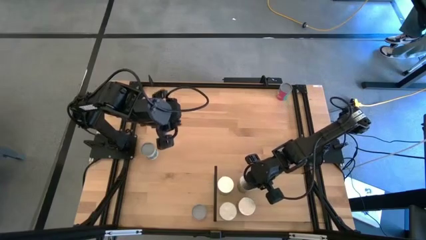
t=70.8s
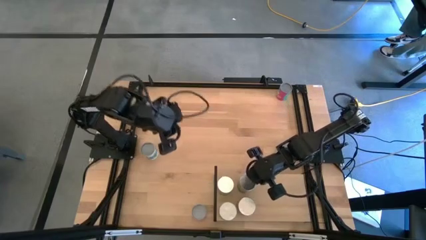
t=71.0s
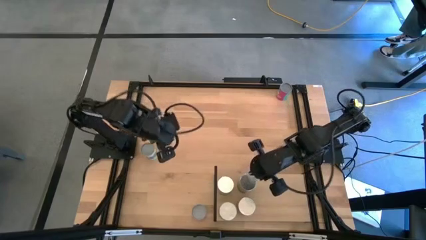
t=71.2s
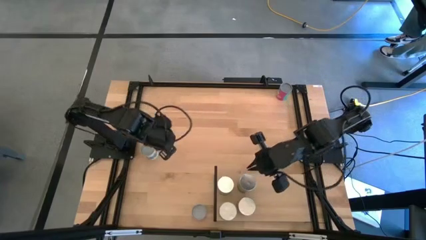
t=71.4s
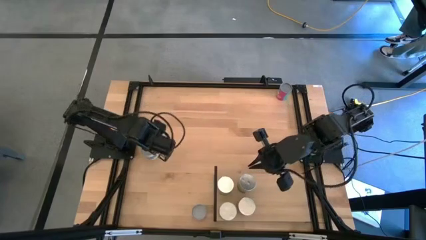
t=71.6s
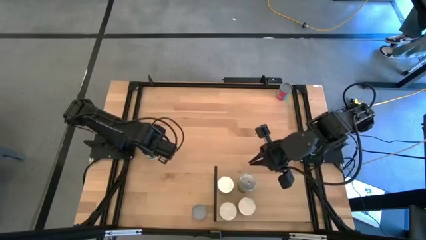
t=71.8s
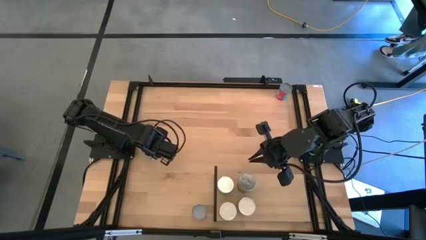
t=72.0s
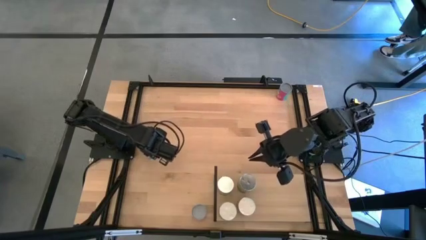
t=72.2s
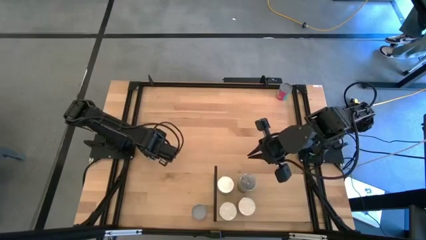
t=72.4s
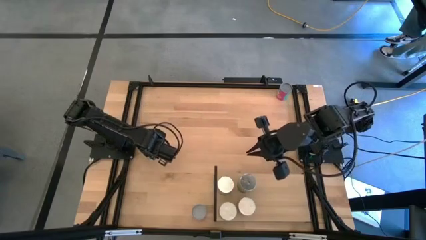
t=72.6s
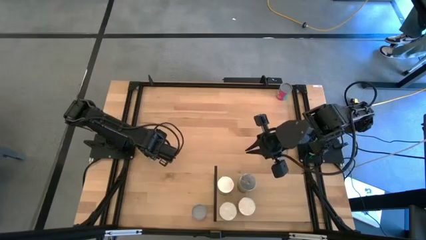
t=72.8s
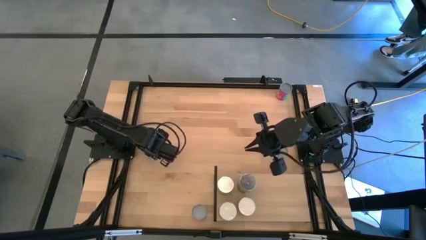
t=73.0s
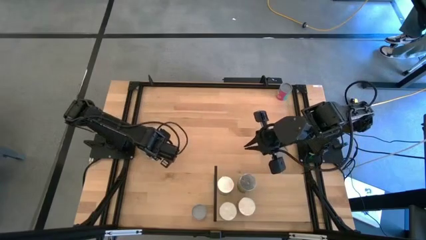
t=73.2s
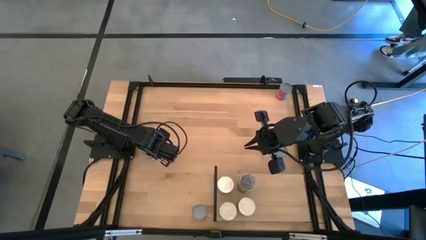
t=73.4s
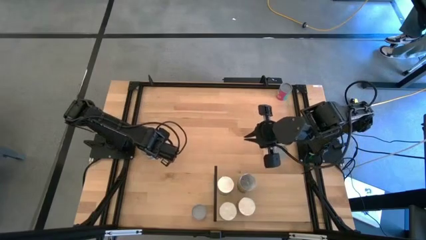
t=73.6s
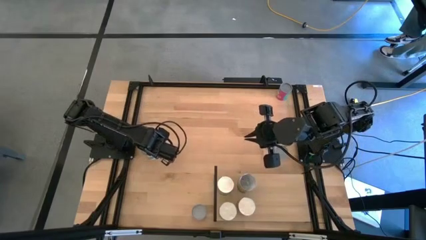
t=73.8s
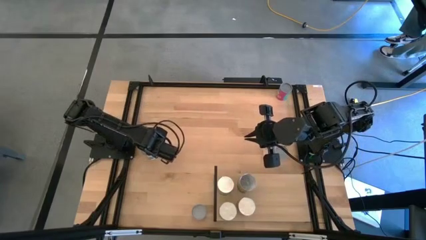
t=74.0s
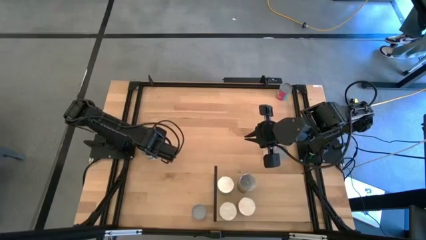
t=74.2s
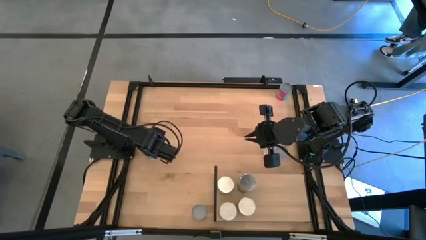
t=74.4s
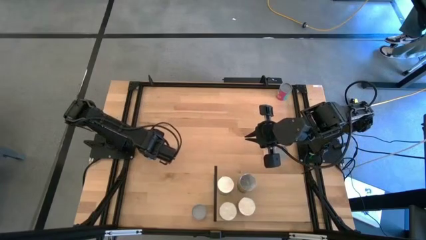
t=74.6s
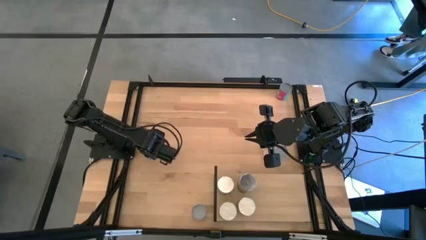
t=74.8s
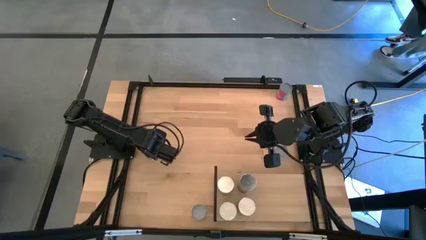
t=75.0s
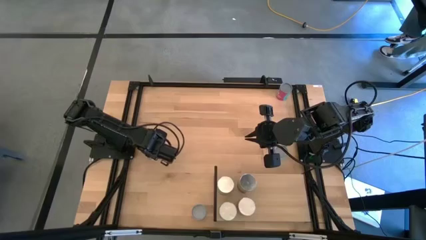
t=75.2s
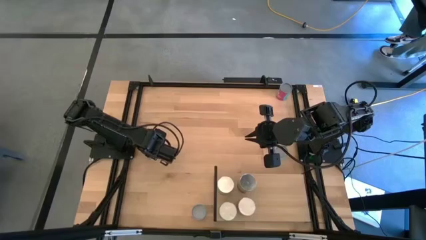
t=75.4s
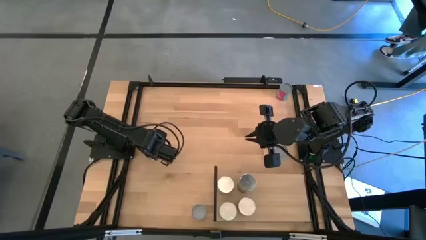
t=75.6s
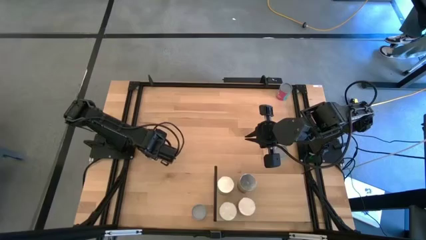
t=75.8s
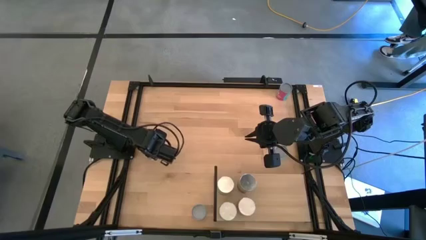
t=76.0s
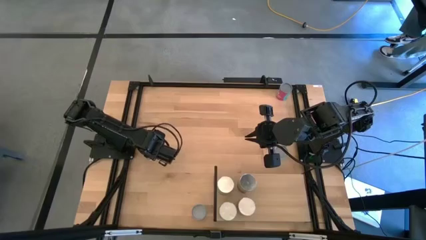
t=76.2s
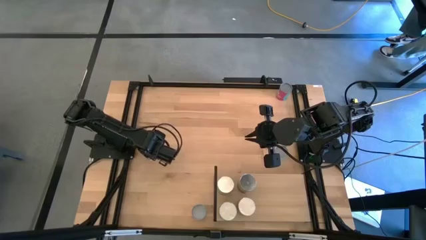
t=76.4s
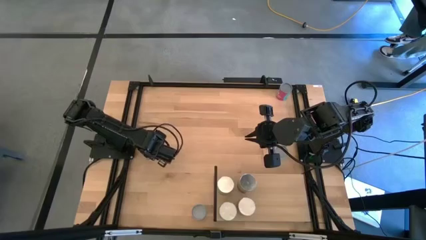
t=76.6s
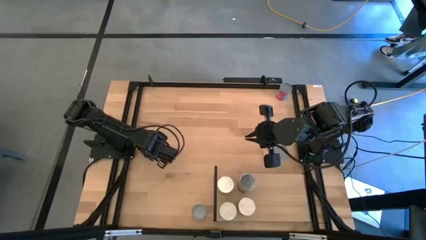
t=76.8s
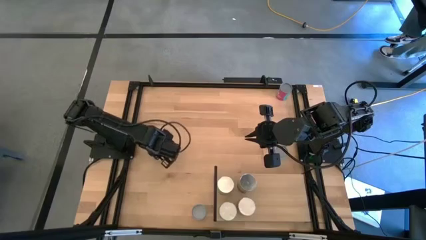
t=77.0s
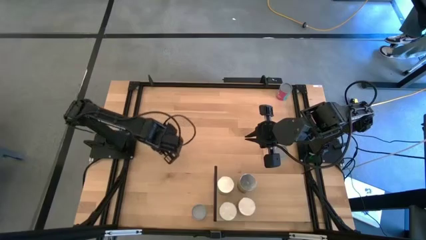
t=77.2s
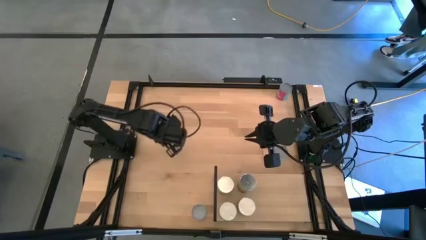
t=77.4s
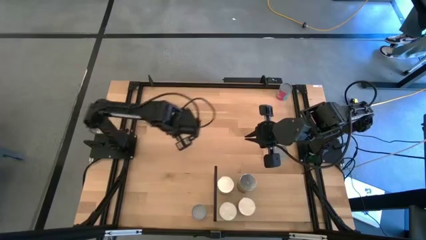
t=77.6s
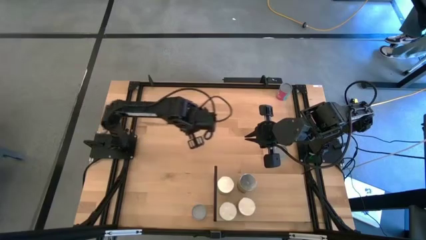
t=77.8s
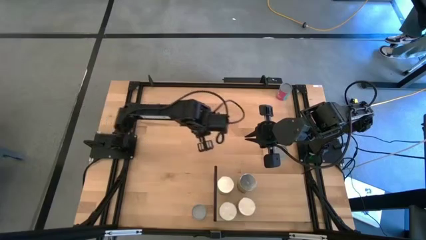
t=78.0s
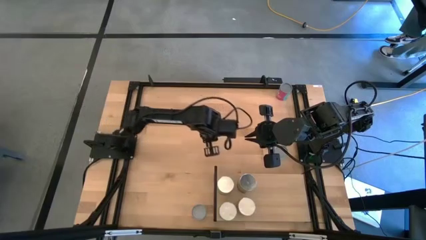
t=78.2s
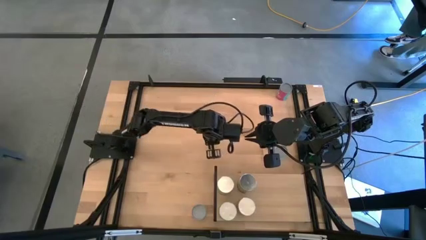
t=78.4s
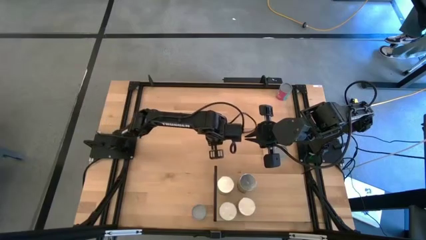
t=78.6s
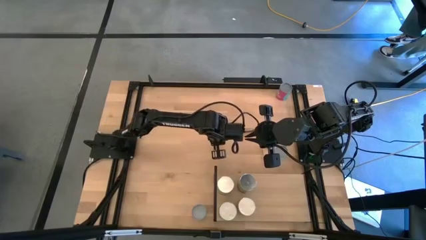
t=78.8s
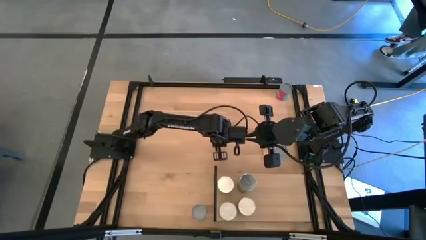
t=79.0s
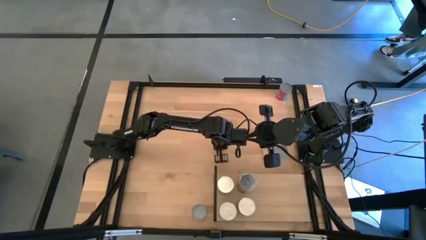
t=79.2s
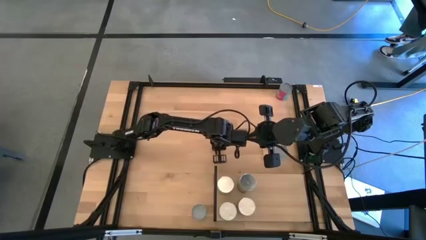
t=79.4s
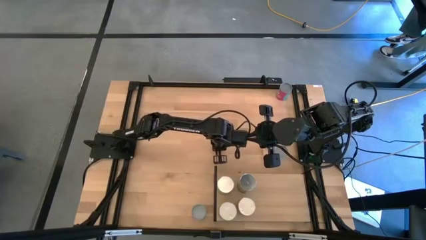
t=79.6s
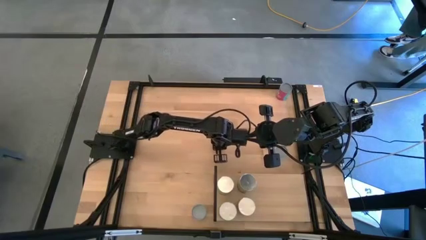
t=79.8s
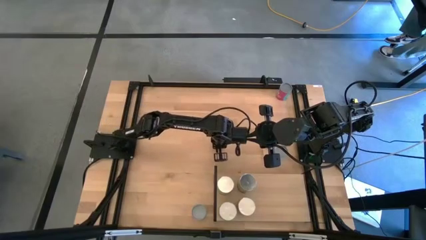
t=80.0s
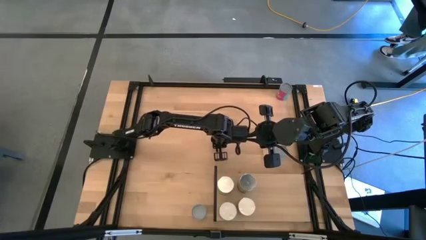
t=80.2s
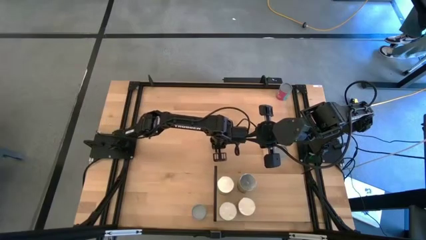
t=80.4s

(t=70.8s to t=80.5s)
Task: Pick and place cans onto a shelf
Put the canned vegetables on the shelf

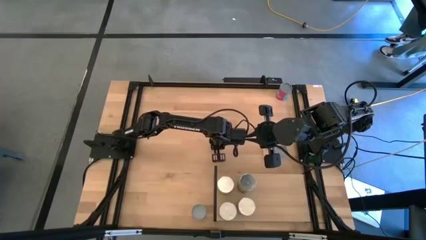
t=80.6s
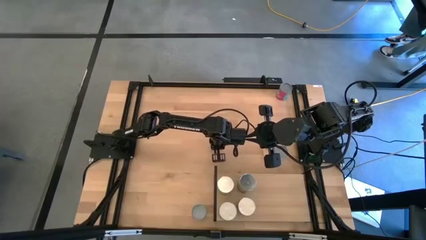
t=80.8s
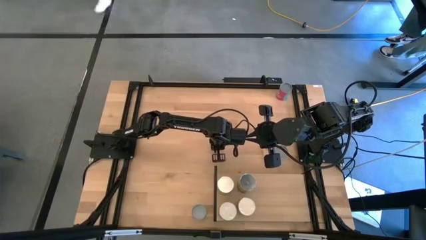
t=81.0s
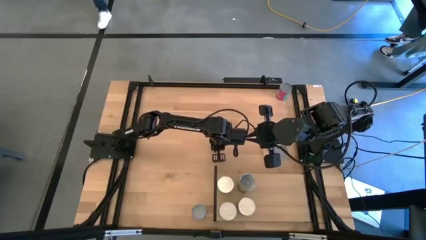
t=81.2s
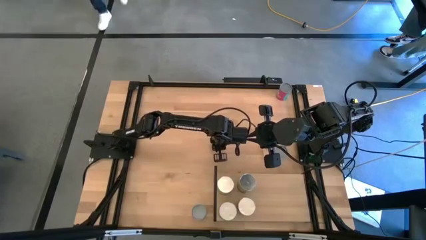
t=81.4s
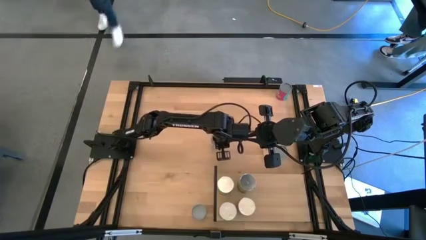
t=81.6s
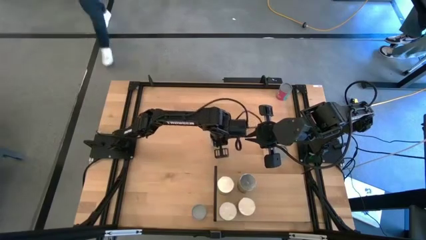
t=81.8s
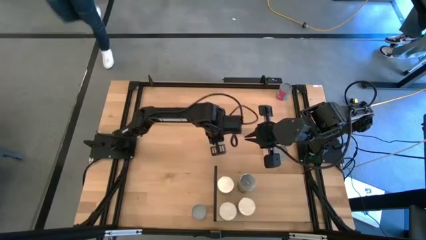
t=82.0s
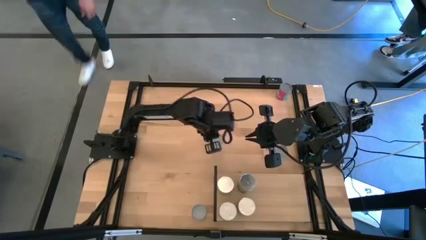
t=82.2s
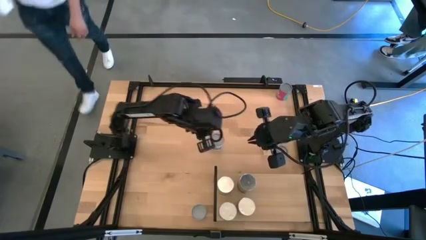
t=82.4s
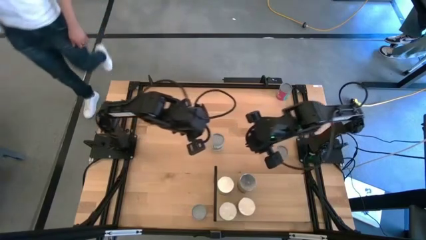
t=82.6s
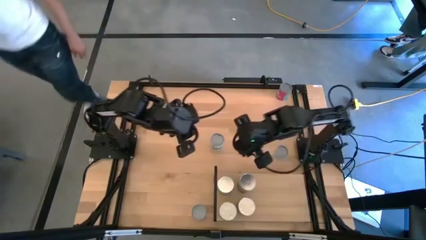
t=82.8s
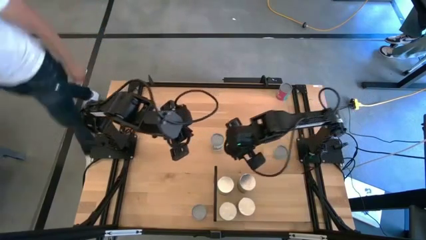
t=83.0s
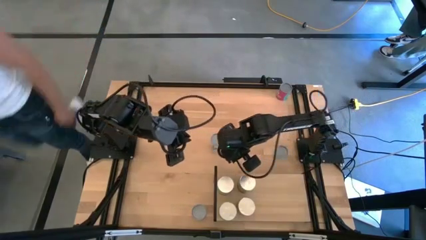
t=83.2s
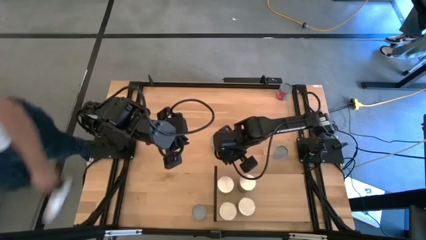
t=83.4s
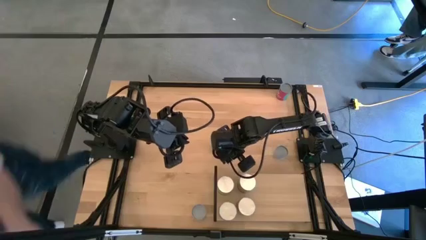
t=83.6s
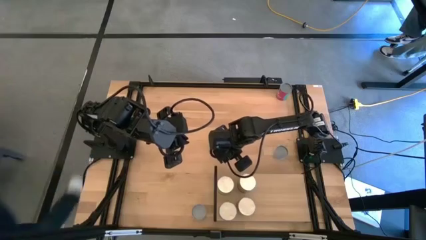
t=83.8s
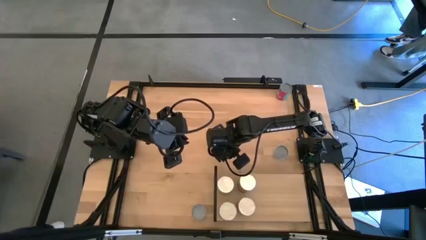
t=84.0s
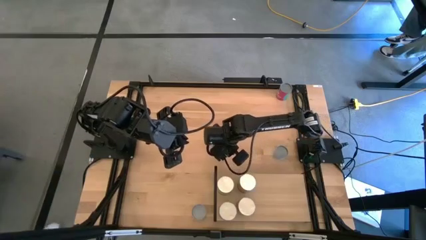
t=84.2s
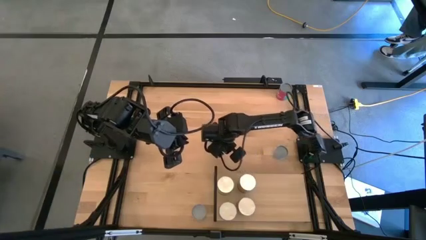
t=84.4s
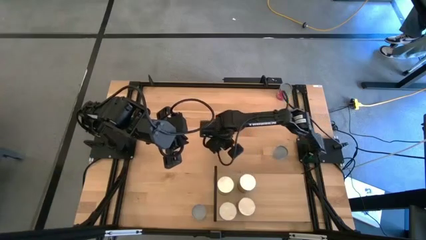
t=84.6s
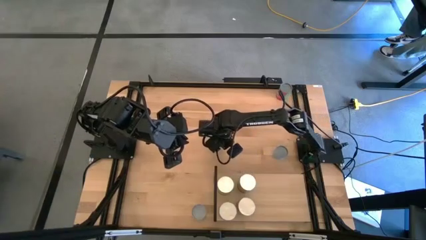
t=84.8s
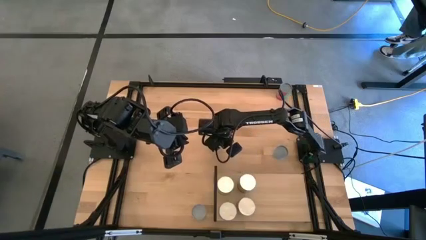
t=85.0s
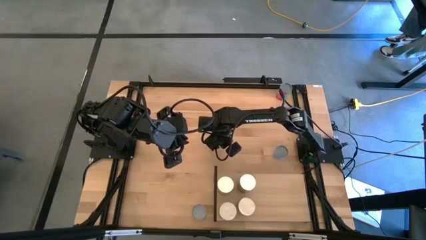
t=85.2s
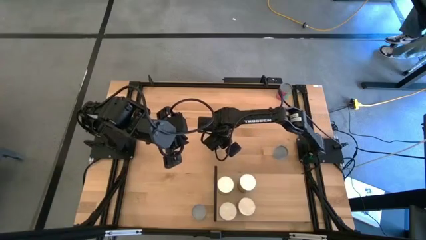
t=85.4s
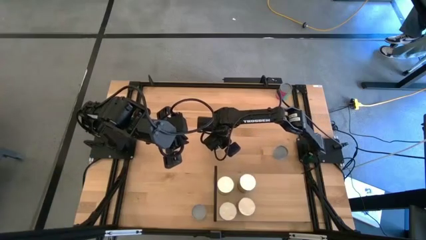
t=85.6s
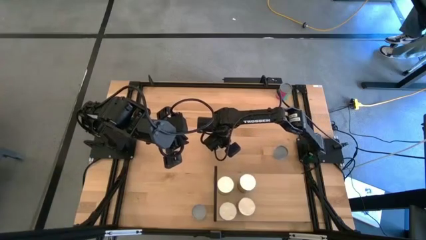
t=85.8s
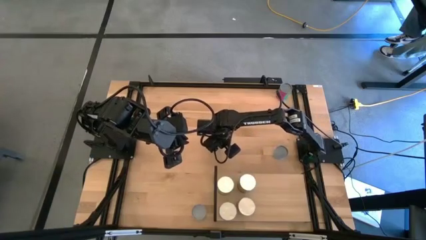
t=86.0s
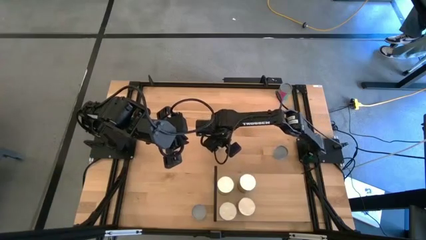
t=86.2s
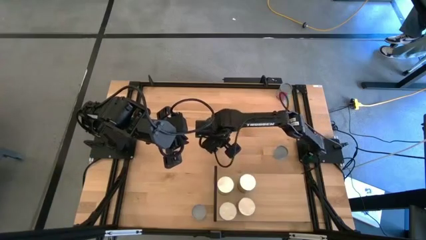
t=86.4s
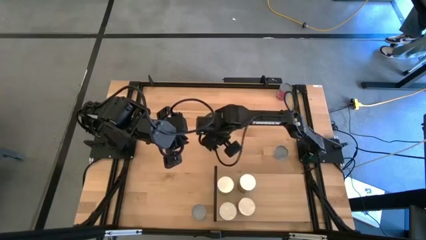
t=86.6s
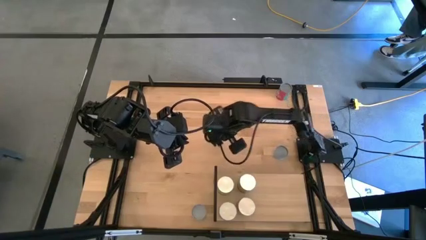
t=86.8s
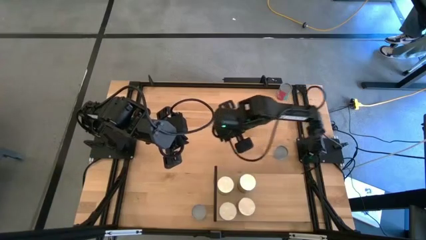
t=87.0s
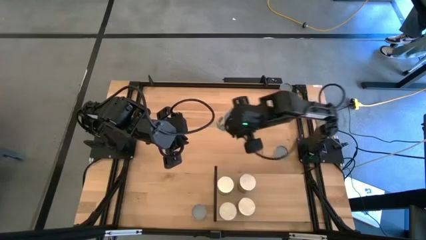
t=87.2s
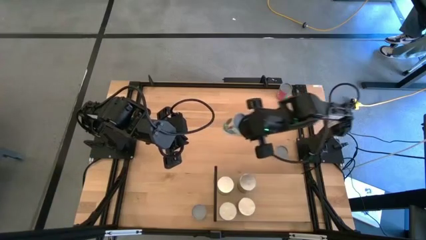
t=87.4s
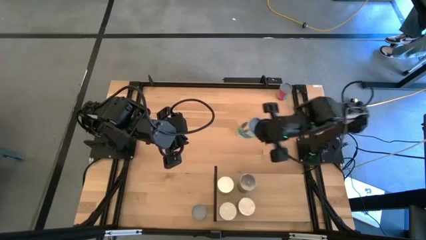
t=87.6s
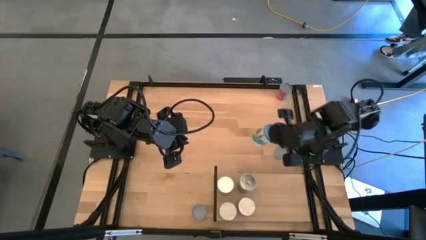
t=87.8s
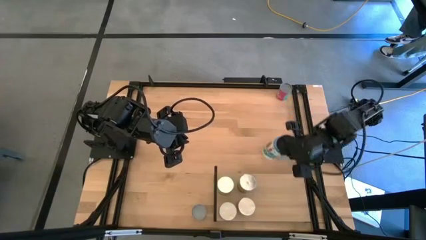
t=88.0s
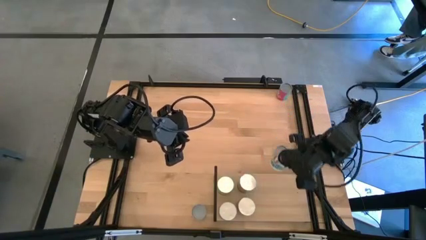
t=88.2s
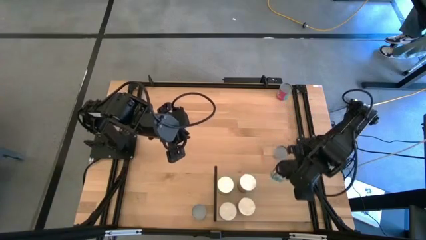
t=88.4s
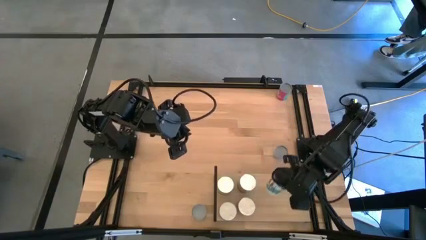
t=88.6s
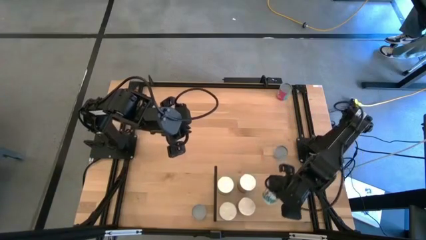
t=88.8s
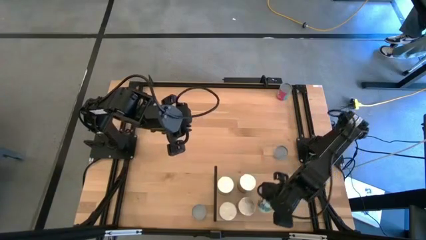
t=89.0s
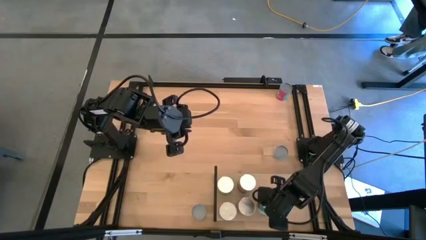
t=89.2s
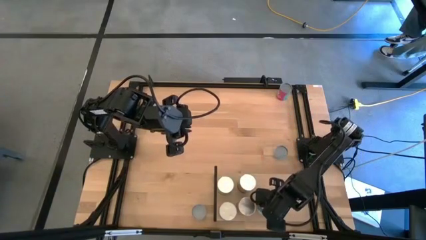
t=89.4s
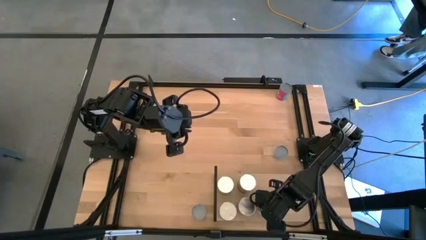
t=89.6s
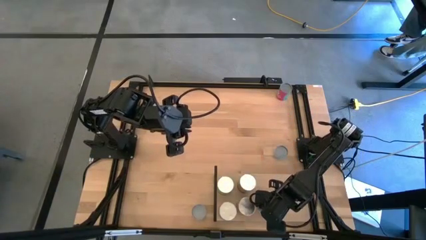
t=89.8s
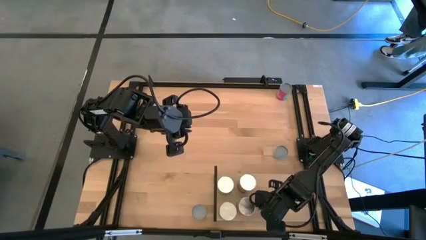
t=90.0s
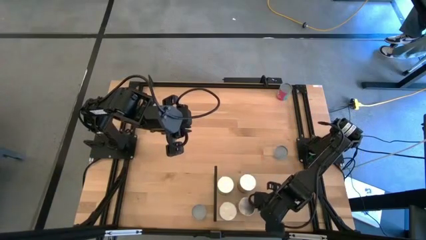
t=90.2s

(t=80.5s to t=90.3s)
Put the canned vegetables on the shelf
